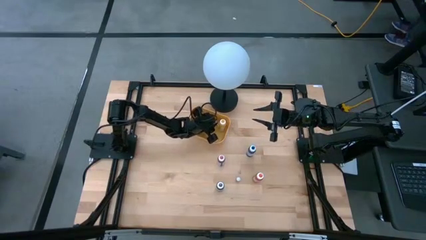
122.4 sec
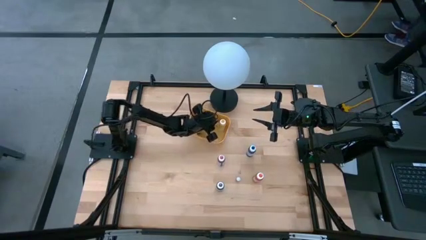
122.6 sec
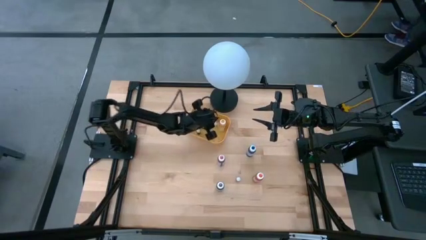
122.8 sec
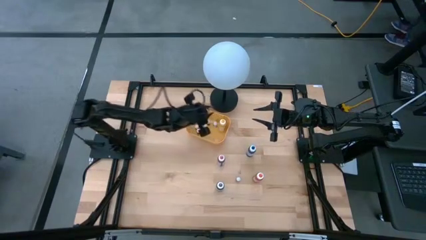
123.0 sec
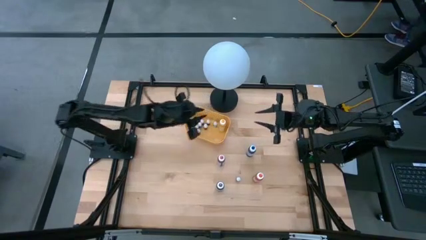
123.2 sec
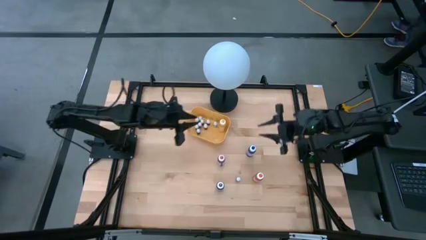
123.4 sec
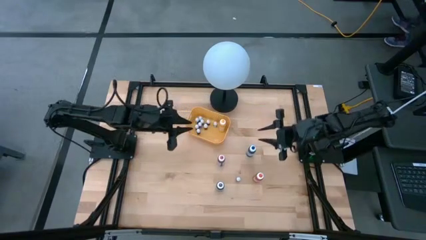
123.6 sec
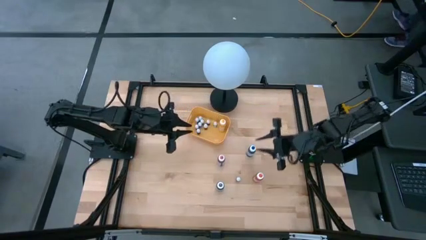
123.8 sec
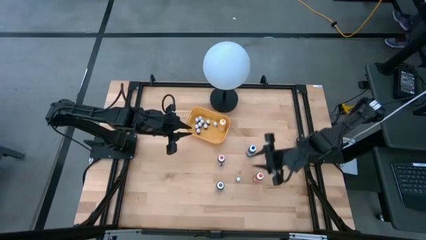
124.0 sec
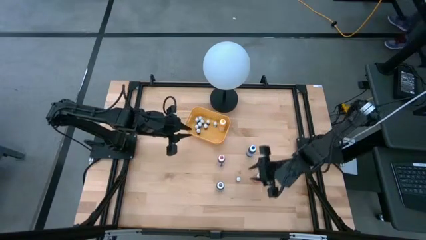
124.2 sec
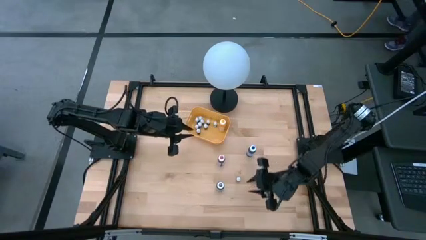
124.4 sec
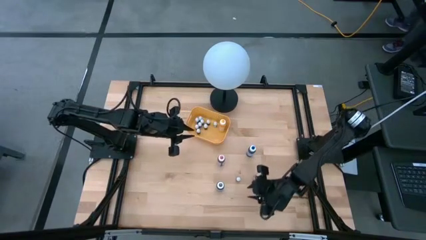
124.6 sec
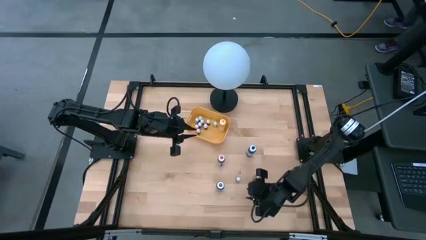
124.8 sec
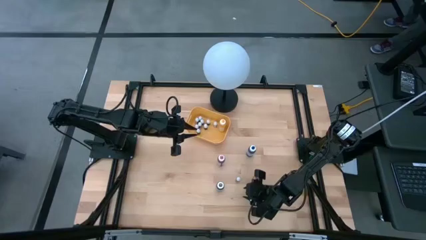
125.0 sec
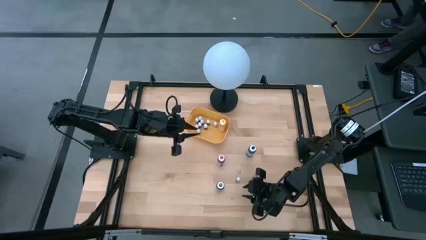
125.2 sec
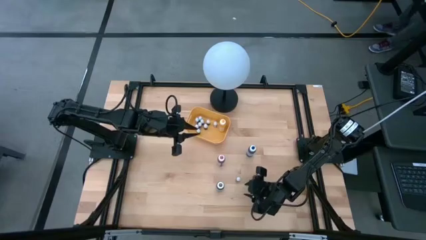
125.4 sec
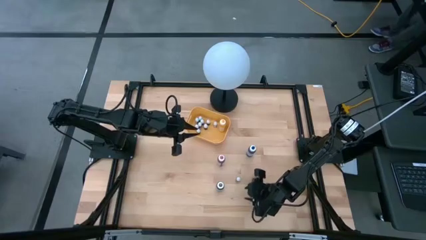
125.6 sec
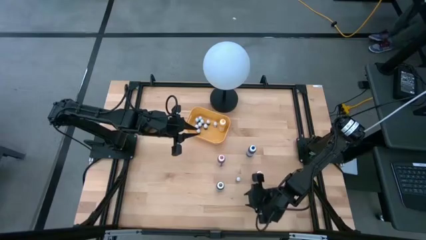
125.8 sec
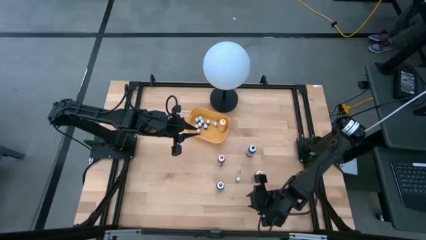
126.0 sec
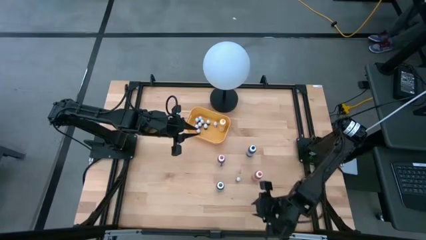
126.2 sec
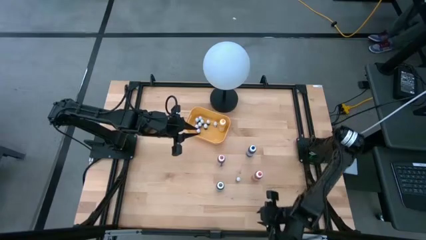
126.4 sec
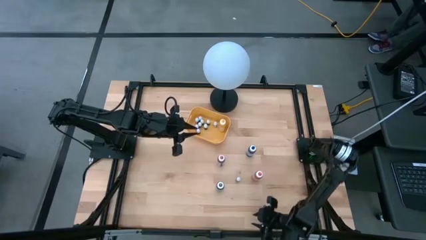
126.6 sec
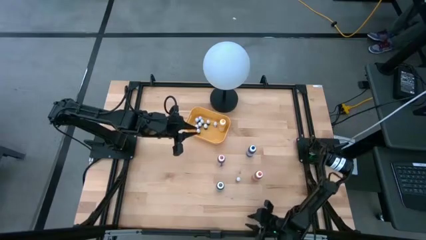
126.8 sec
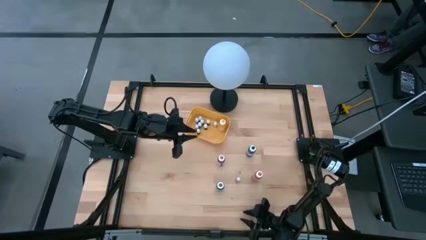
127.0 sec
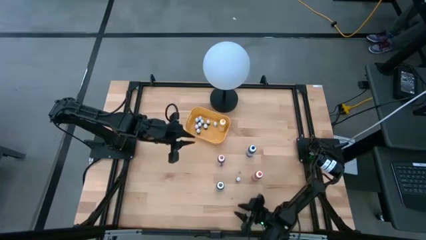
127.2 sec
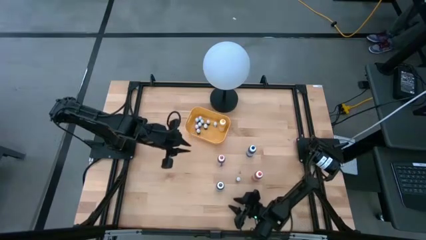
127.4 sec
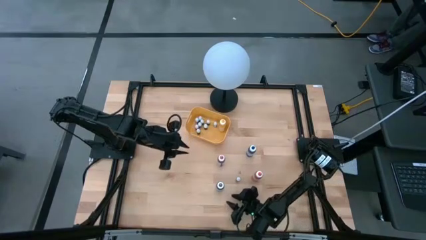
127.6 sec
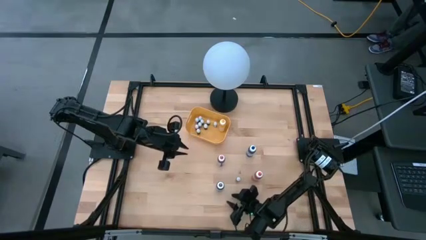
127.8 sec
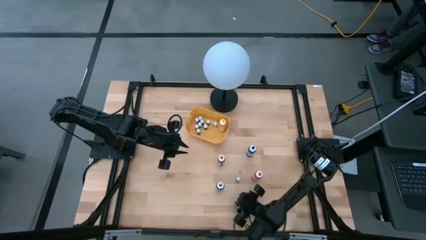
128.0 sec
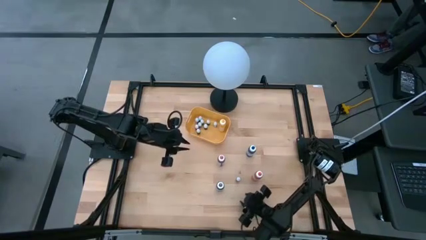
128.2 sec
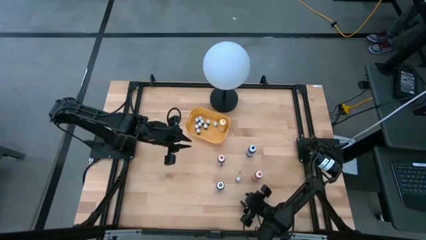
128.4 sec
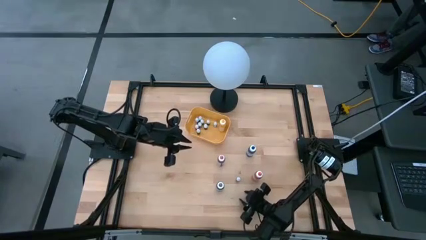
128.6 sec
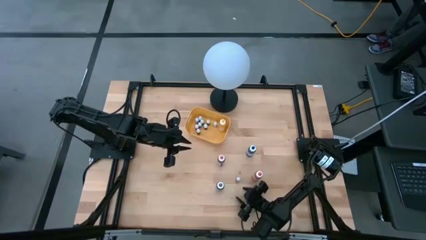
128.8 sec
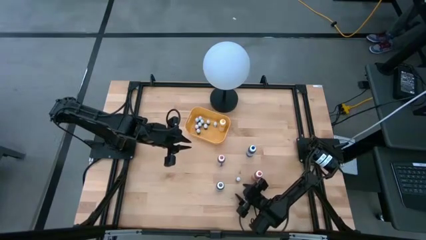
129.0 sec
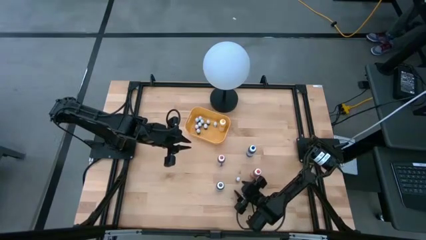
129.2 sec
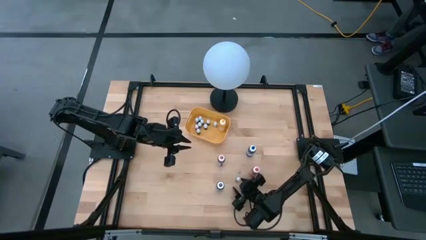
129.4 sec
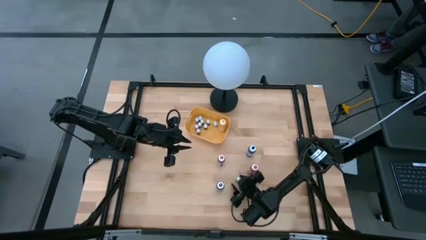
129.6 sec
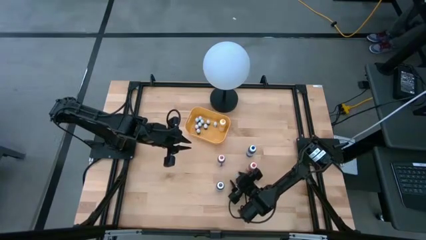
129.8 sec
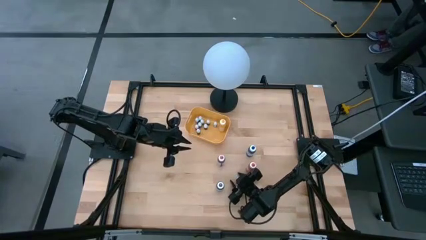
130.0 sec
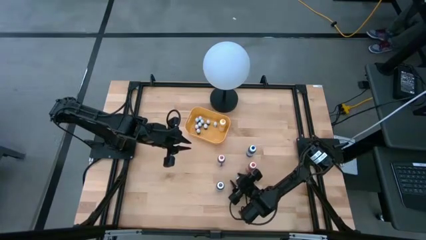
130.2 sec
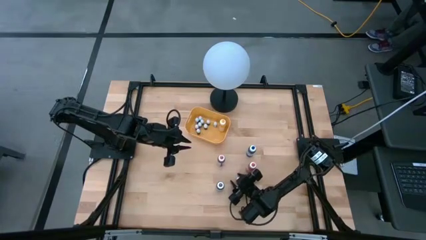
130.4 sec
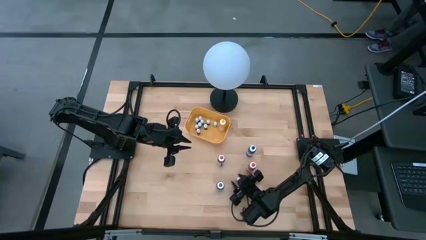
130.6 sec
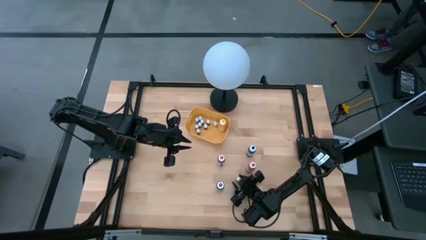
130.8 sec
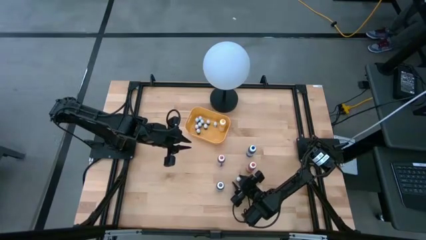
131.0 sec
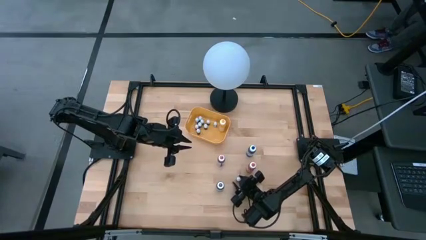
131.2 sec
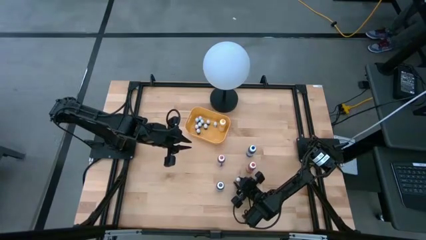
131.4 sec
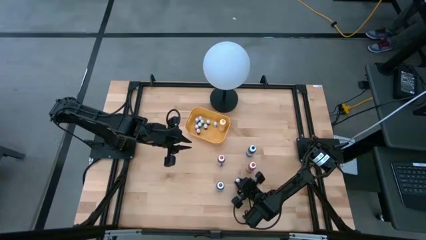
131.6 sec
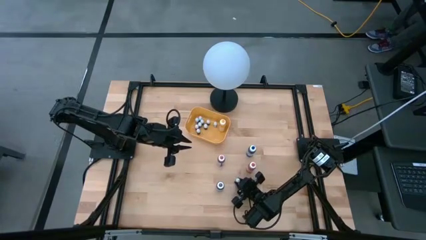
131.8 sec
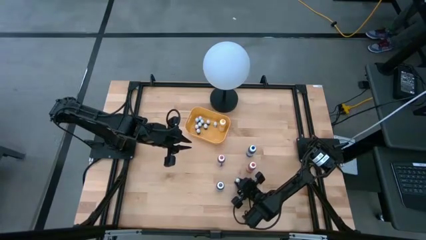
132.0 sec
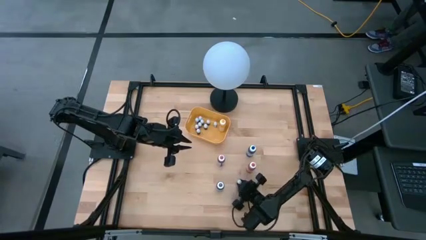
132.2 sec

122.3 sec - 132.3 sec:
Task: Pick & Place food coloring
Put the small green food coloring bottle into the yellow bin

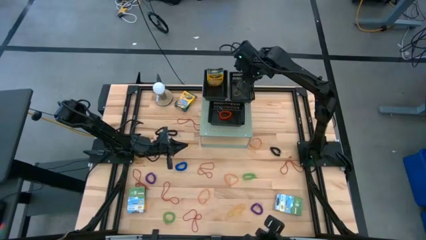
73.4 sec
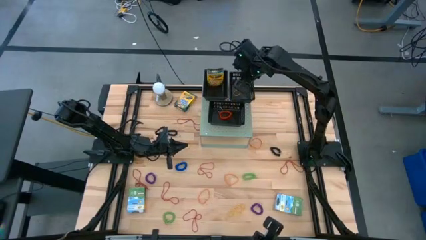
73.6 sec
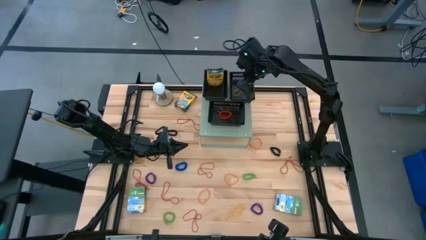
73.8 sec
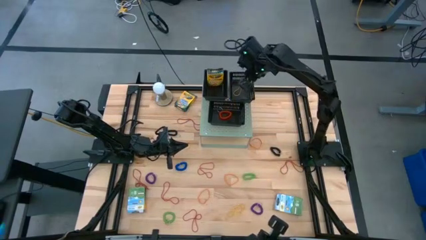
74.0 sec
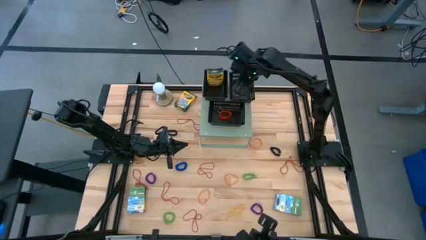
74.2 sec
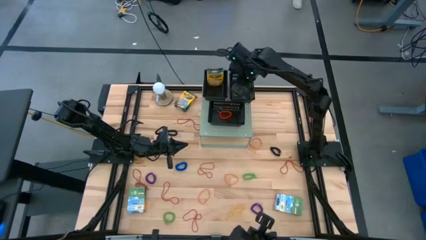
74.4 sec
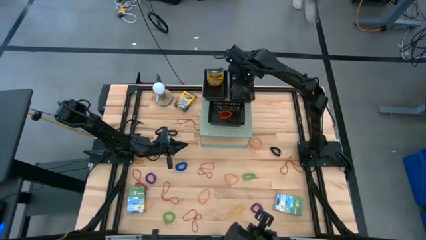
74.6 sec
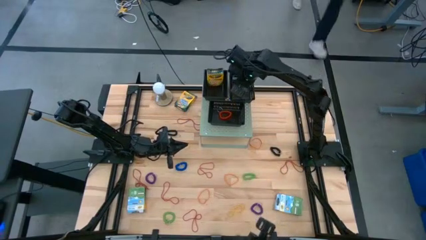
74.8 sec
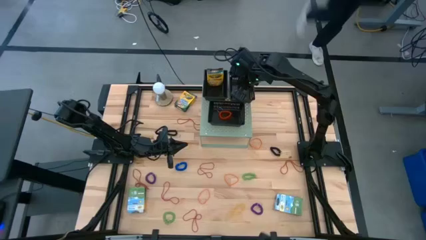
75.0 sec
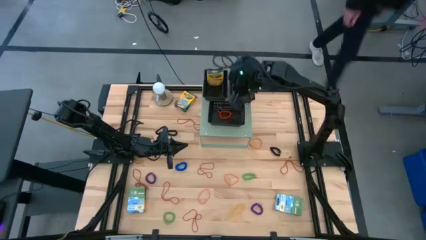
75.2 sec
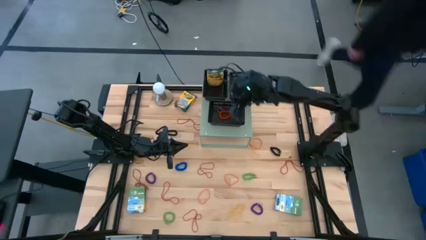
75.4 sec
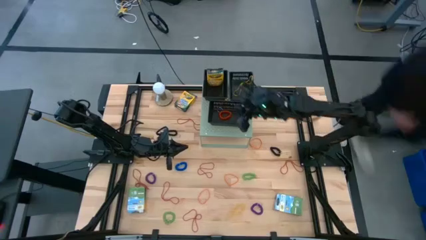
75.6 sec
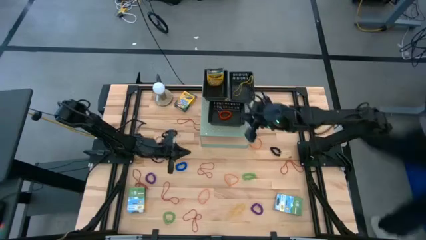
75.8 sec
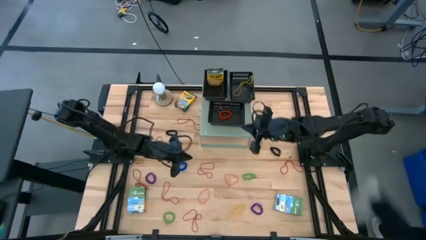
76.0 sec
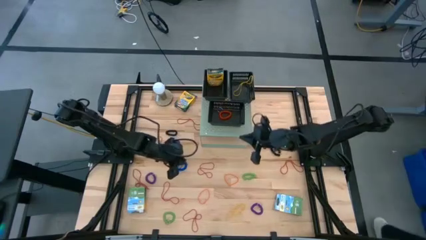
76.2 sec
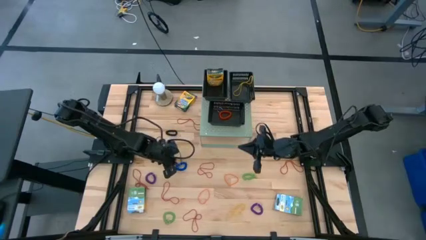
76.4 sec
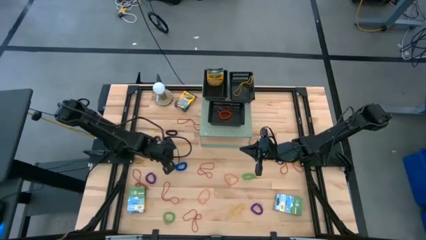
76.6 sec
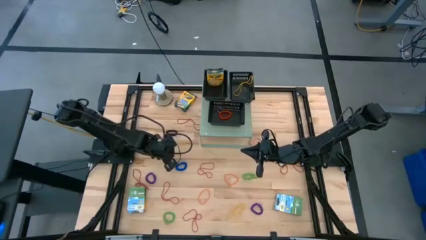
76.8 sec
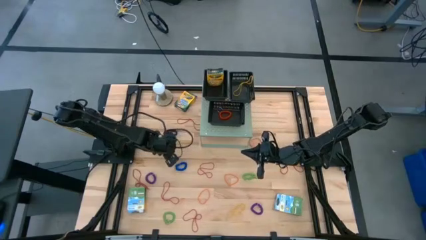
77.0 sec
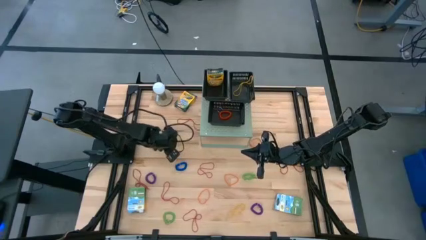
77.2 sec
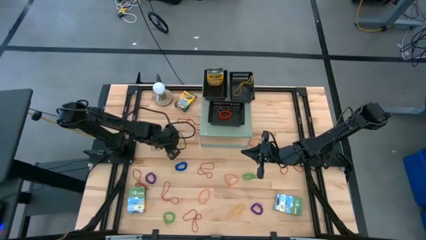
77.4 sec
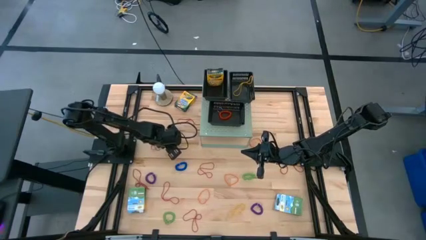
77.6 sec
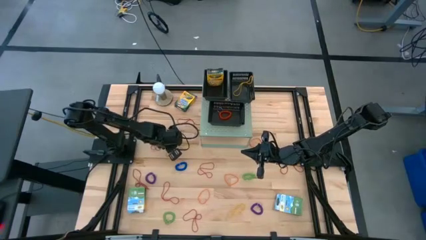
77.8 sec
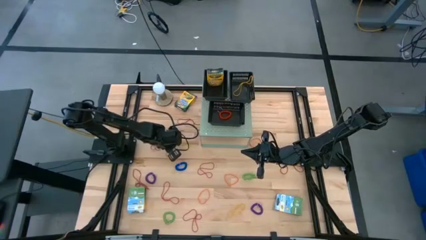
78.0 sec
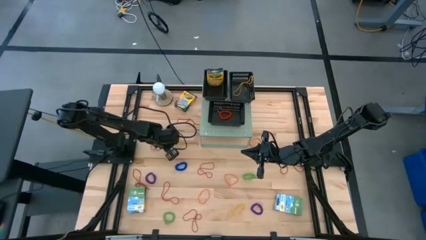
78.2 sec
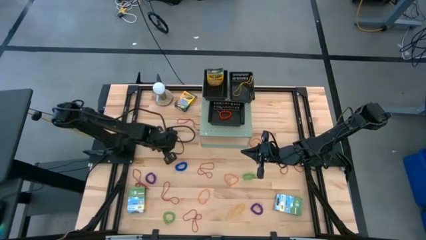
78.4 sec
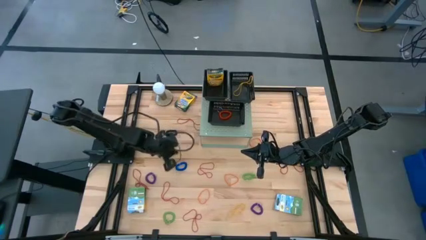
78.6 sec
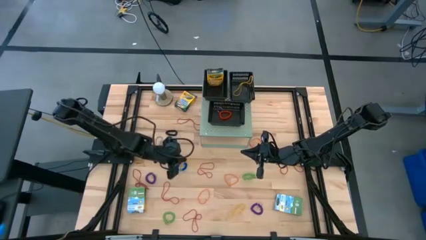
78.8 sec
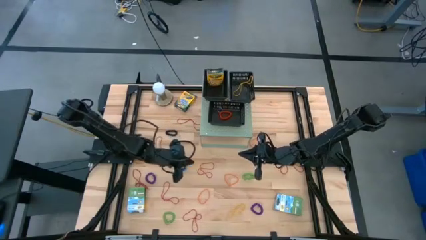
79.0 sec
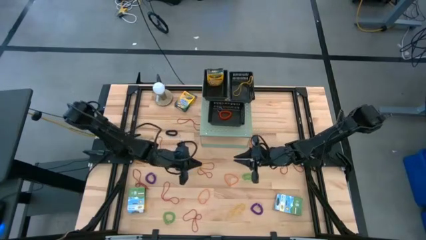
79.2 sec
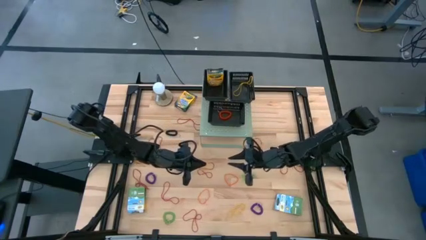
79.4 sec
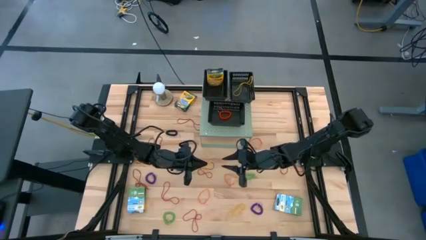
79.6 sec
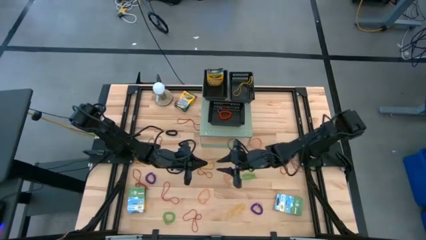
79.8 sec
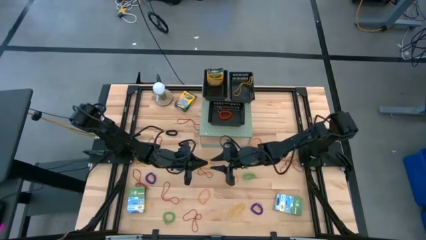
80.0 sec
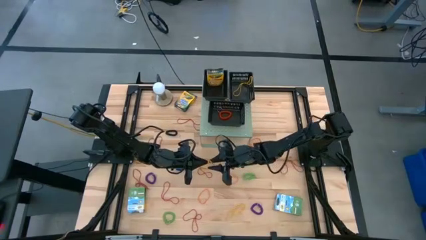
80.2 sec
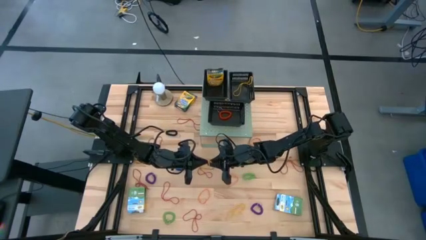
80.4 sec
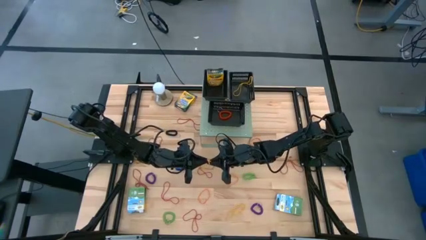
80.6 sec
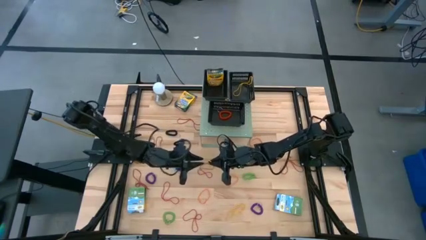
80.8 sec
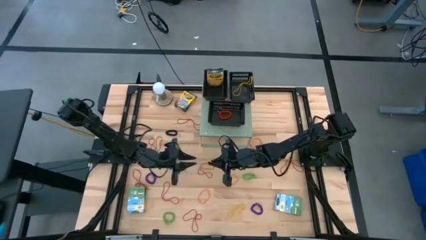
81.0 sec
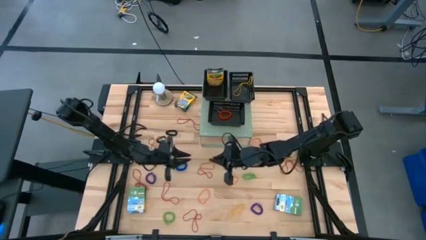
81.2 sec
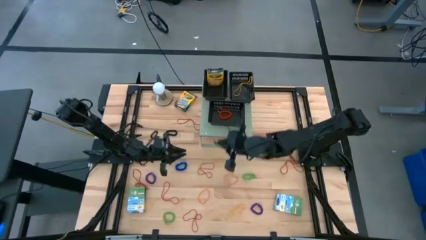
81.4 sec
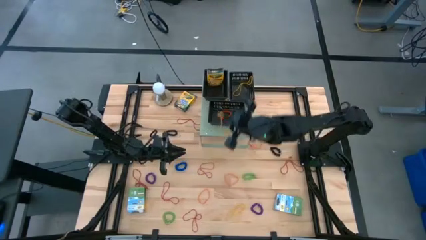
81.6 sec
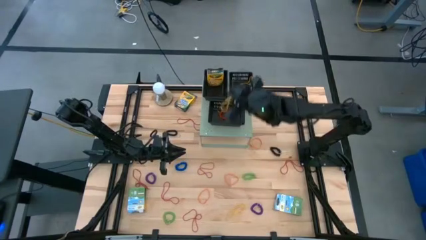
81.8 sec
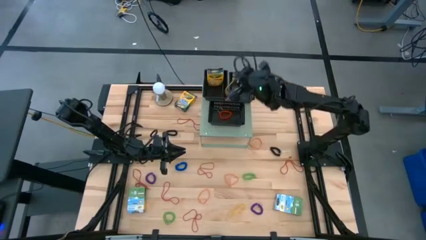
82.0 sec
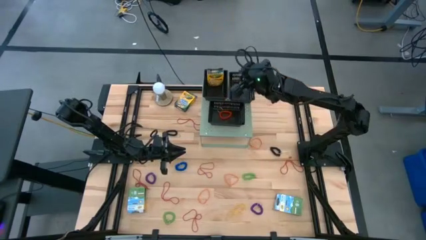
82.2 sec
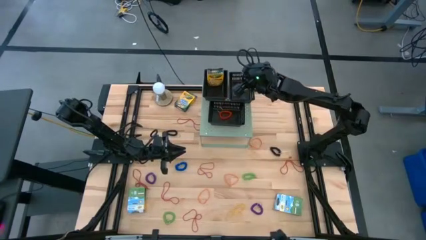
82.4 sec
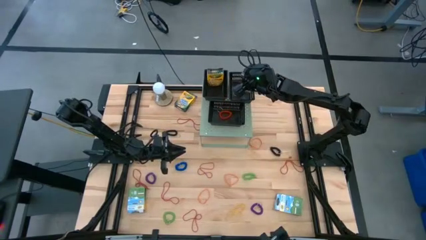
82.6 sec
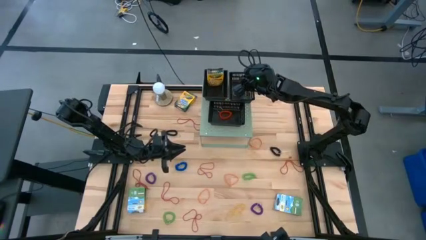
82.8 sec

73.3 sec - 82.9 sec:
Task: Pick & Place Office Desk Supplies
Put the yellow rubber band into the top right black bin on the shelf
